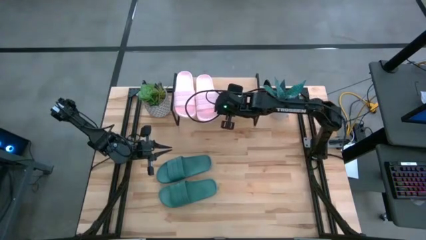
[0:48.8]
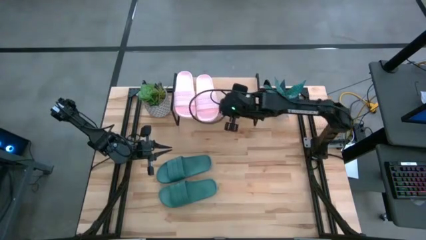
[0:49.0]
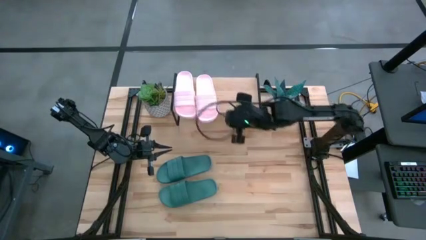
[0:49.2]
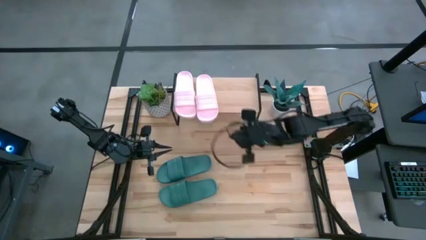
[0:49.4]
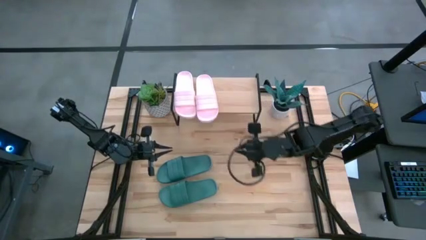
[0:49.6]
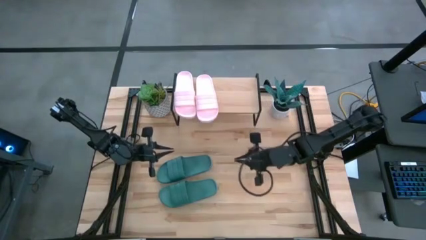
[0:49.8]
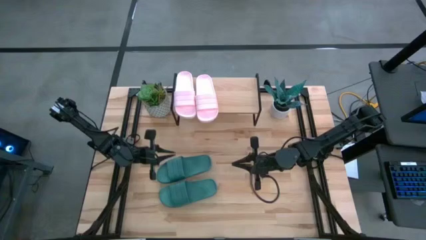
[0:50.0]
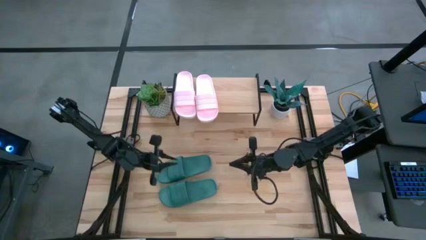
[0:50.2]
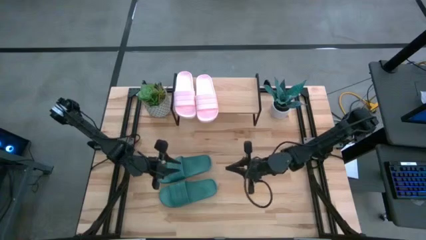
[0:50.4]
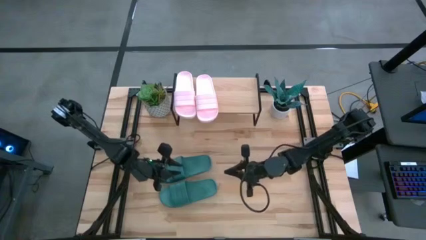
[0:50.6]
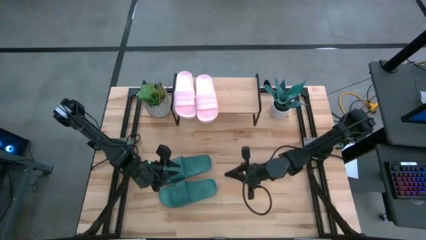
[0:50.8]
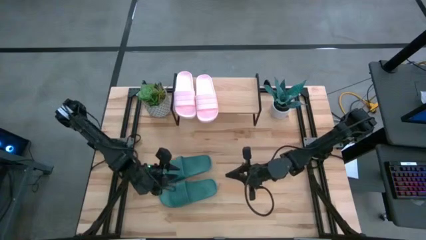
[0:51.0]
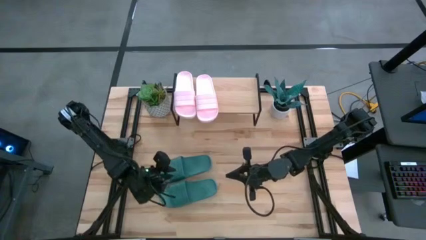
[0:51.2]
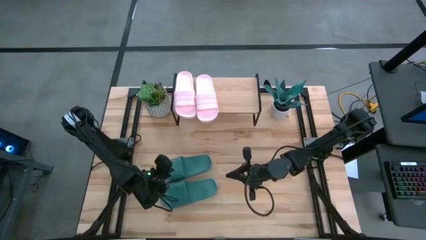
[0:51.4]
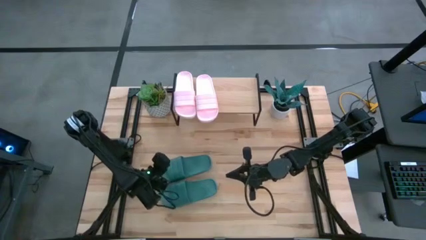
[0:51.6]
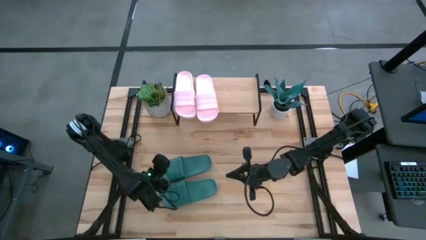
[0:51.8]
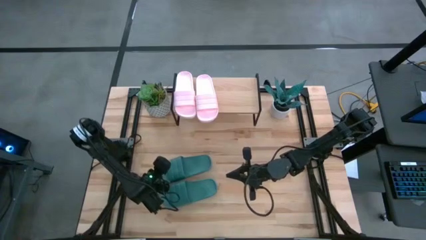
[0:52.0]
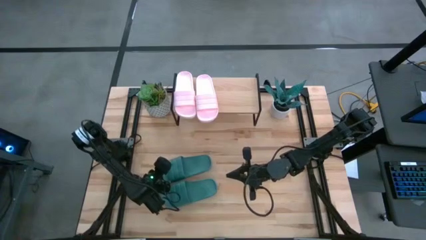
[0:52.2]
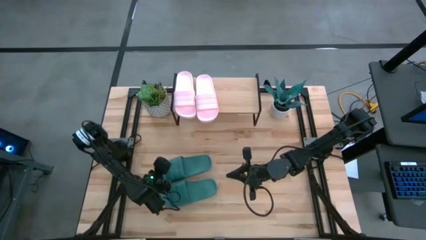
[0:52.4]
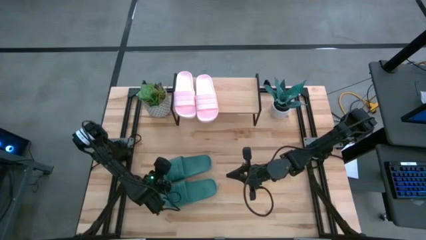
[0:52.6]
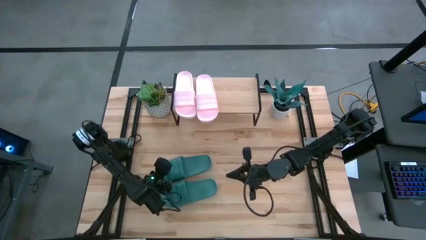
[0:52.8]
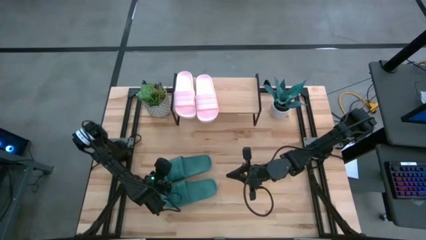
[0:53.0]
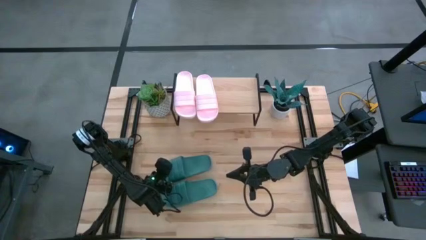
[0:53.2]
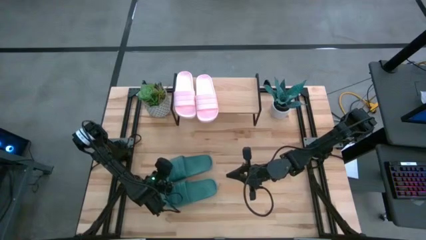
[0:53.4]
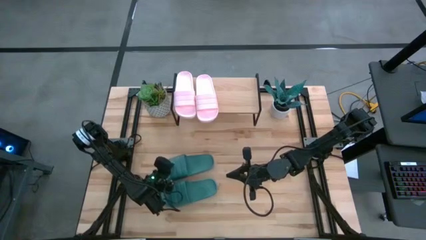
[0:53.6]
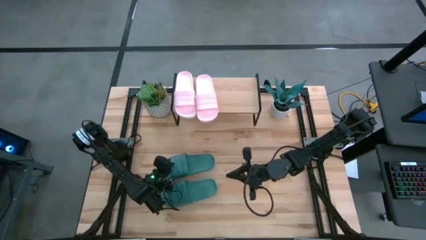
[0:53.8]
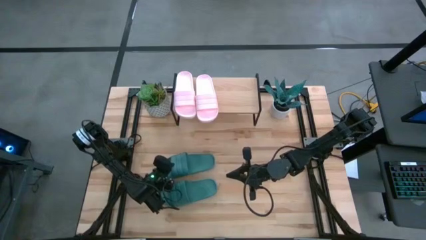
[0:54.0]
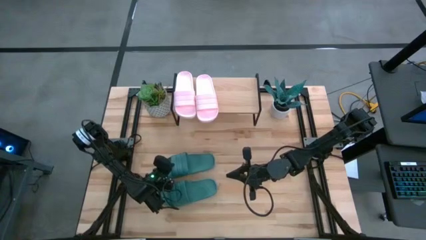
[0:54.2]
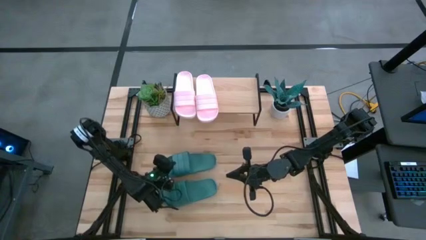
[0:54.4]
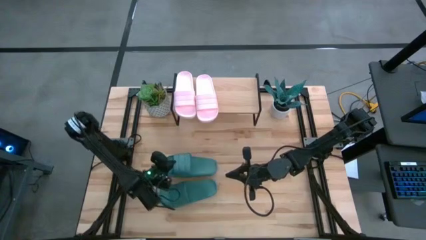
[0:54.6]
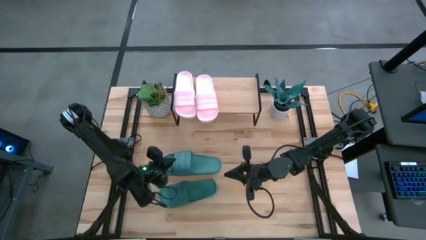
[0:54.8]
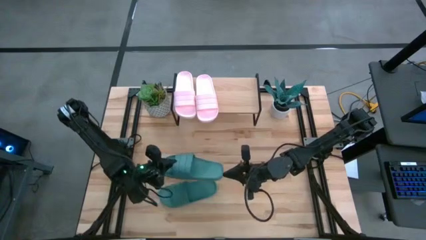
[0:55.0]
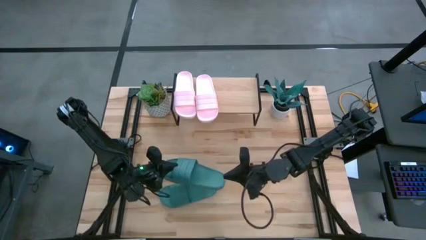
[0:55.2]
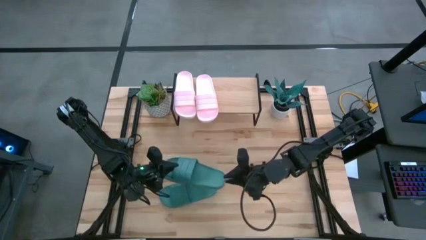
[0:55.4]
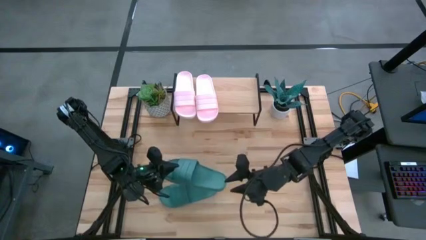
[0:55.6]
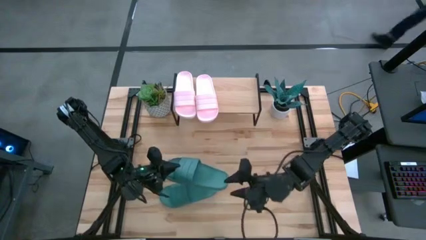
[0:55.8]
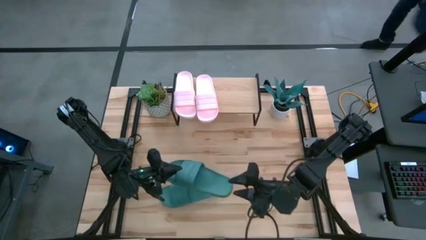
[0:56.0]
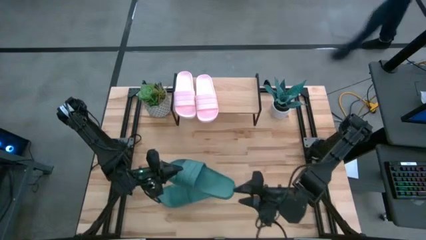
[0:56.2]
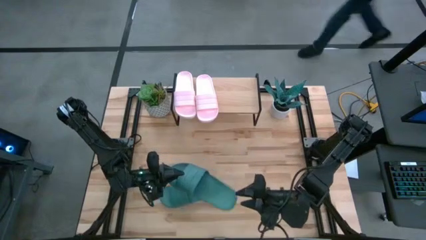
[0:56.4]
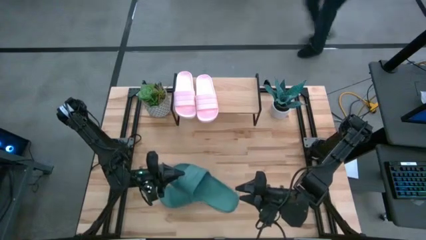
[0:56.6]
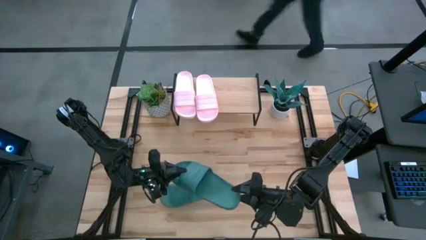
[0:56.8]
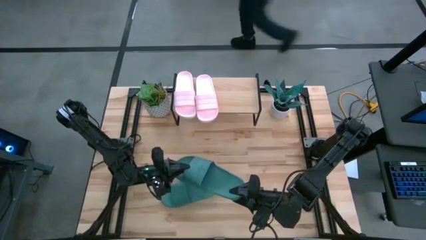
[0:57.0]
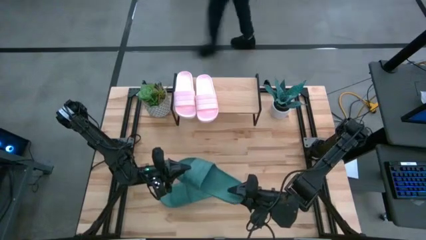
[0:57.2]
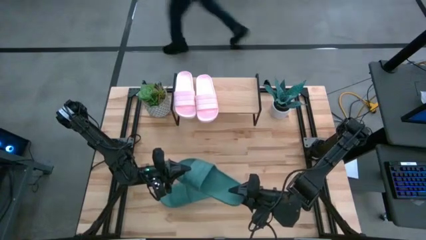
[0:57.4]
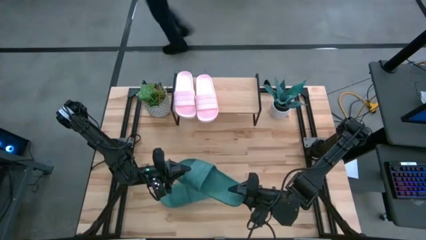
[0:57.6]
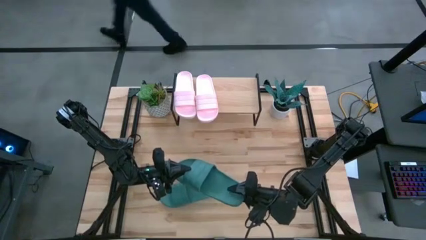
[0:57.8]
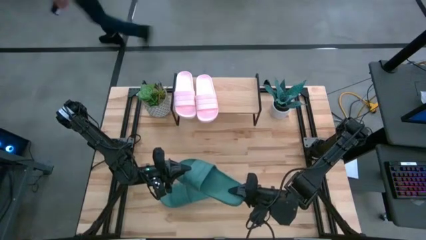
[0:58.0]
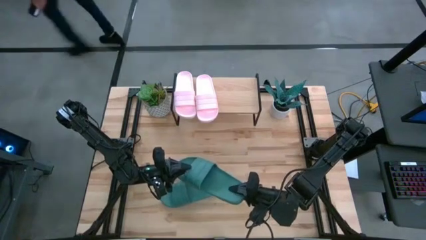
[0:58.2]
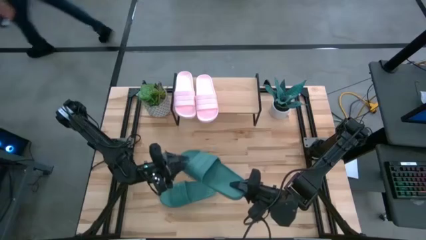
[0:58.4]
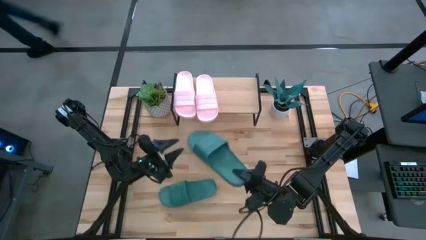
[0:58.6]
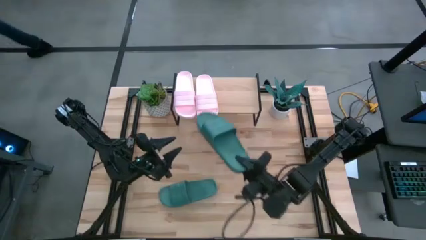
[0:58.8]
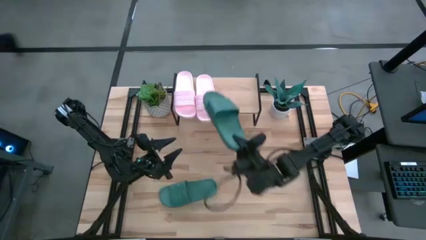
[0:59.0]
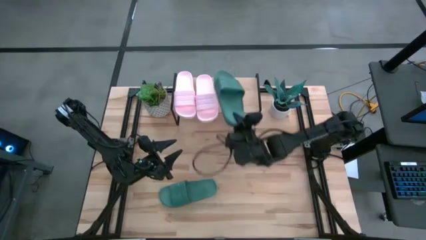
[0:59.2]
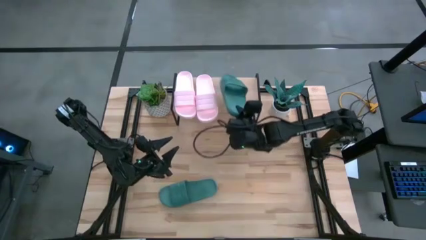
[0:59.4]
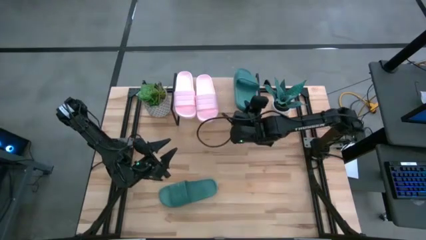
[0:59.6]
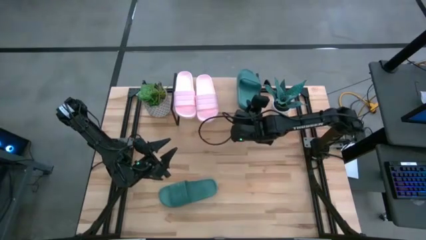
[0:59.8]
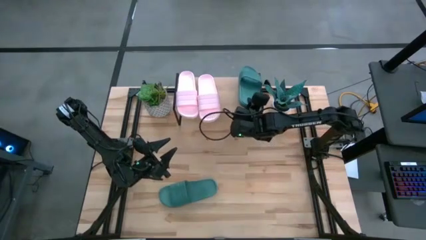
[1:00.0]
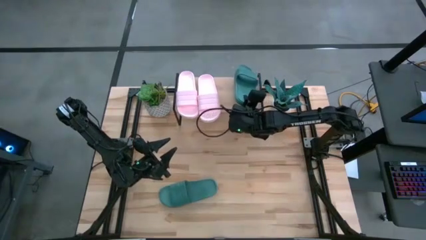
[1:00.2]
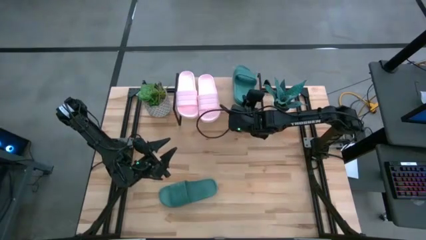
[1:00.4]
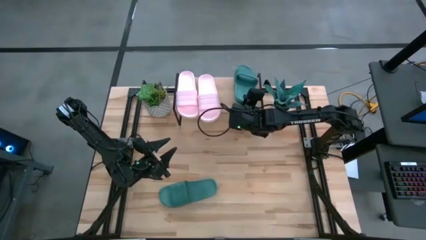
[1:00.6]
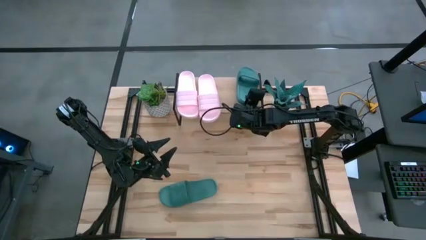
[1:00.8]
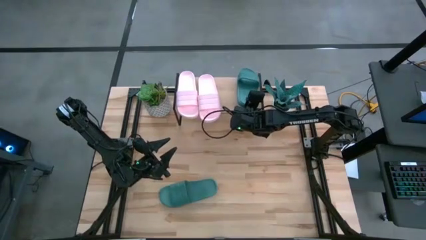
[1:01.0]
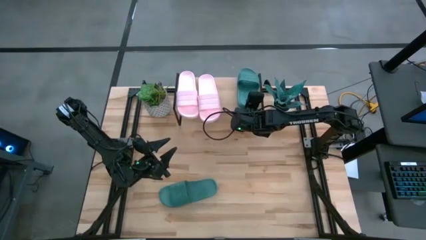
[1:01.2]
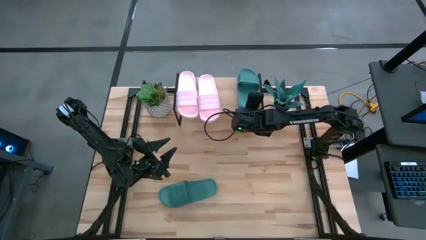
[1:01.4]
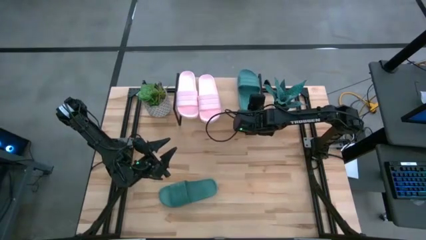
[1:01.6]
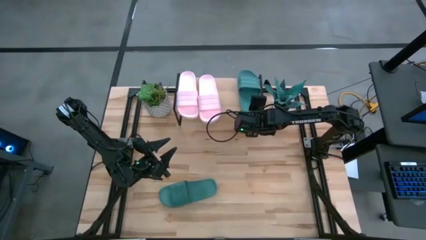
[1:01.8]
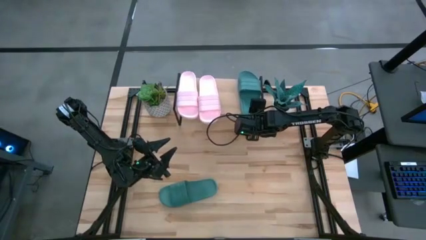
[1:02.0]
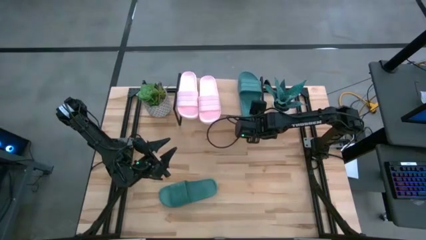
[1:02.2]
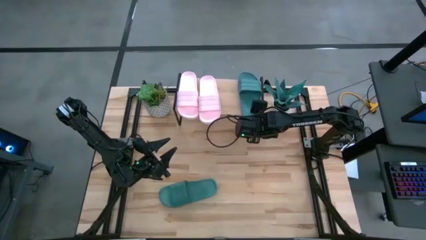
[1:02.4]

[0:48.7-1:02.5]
Task: Pick and place slides into the shelf
Put the top green slipper on the shelf
